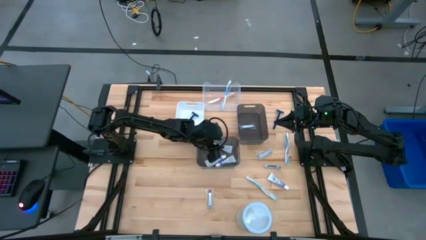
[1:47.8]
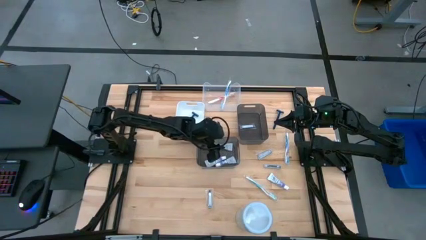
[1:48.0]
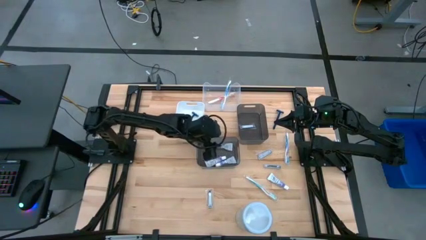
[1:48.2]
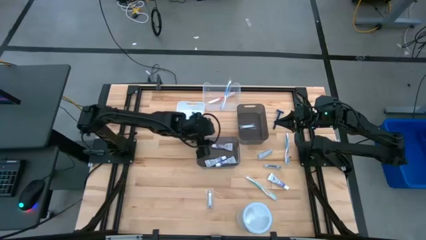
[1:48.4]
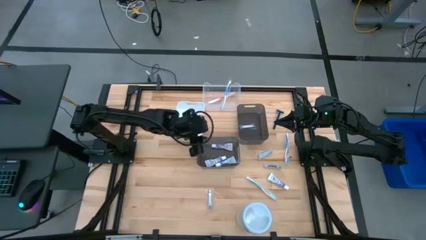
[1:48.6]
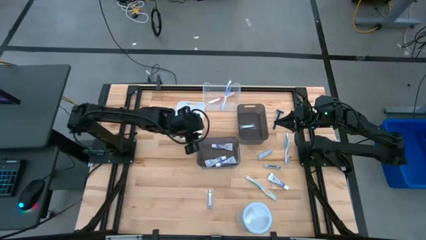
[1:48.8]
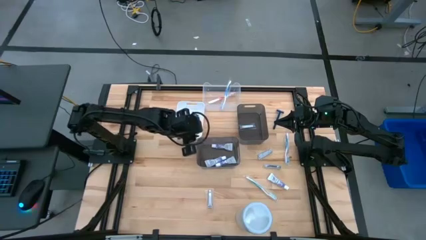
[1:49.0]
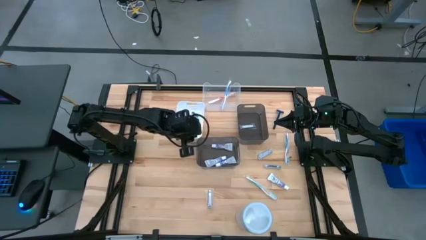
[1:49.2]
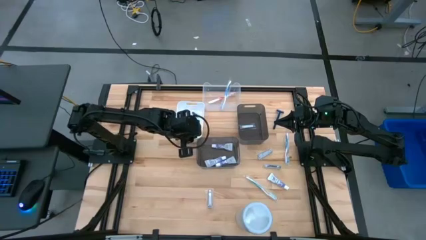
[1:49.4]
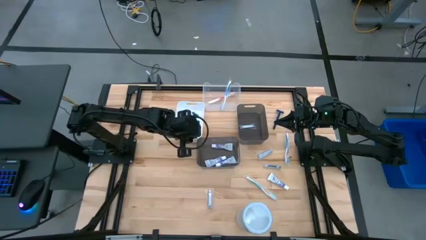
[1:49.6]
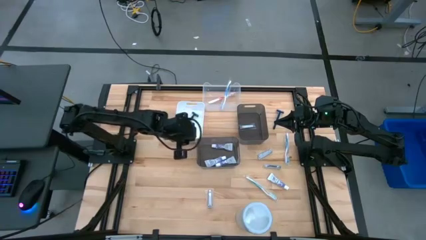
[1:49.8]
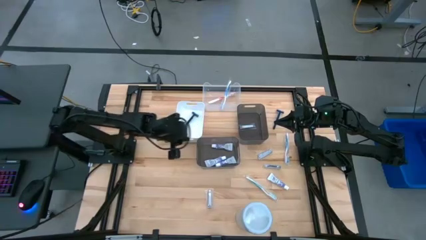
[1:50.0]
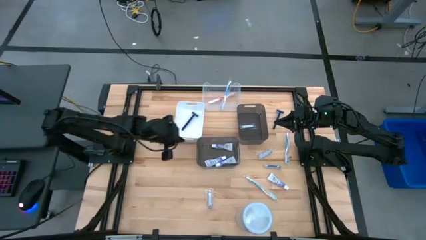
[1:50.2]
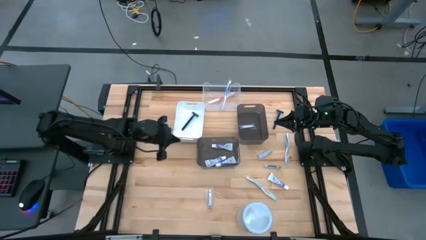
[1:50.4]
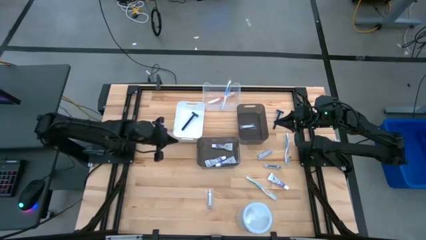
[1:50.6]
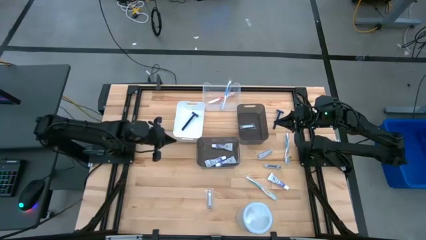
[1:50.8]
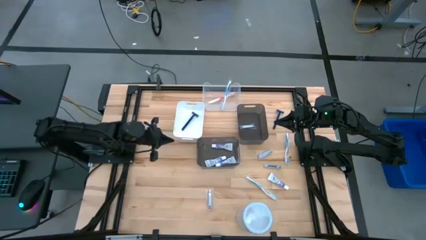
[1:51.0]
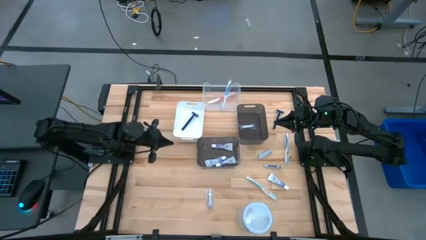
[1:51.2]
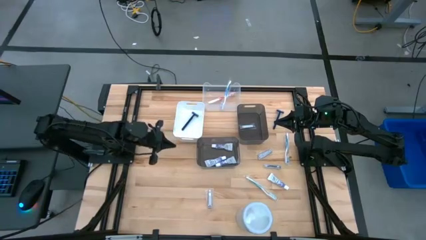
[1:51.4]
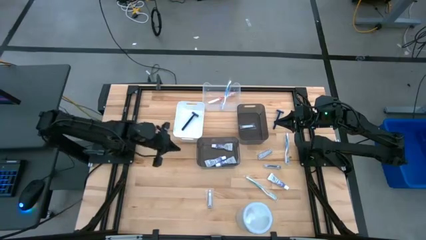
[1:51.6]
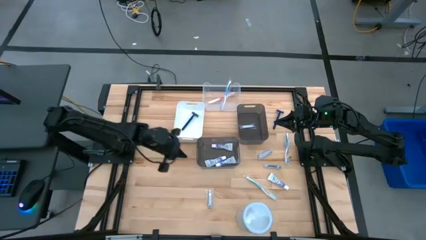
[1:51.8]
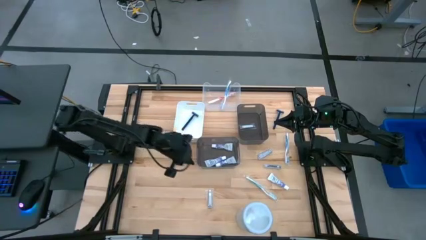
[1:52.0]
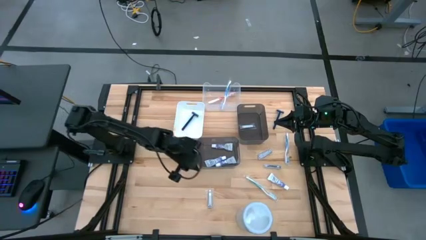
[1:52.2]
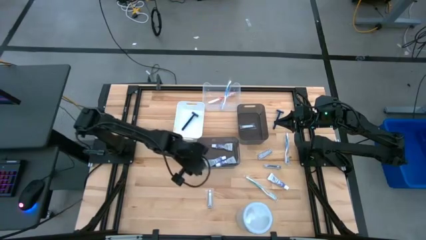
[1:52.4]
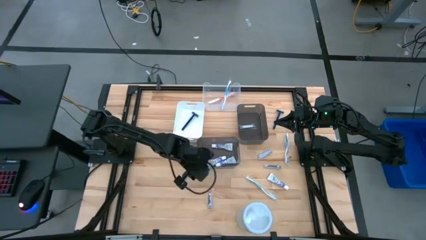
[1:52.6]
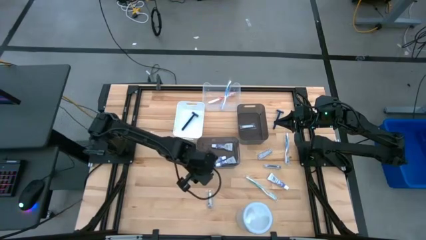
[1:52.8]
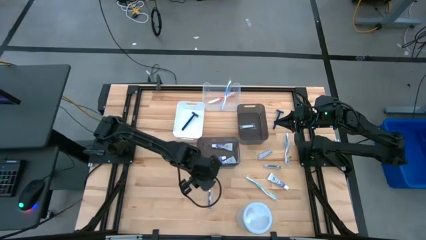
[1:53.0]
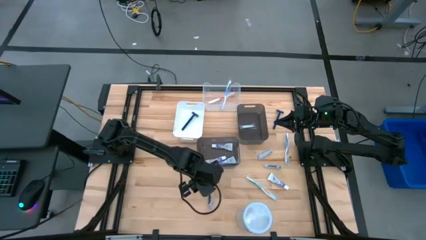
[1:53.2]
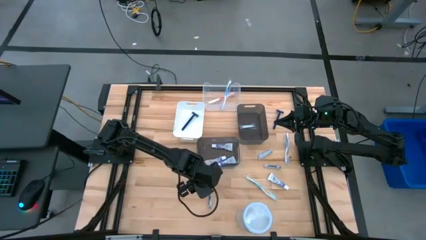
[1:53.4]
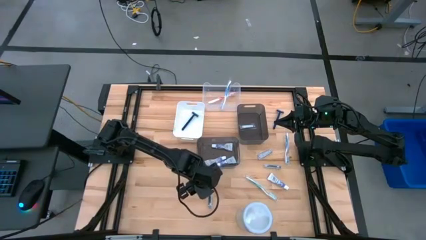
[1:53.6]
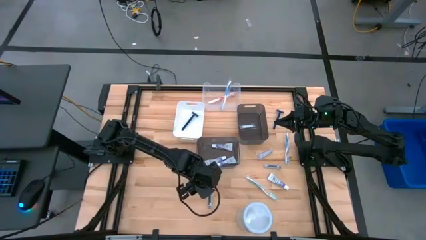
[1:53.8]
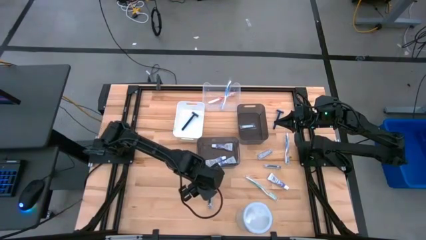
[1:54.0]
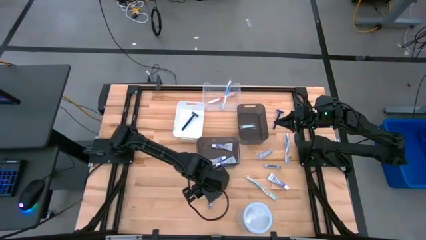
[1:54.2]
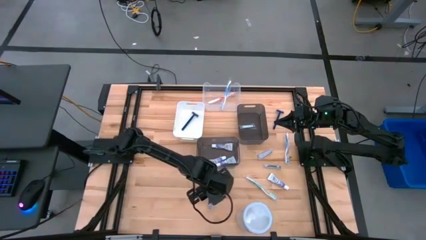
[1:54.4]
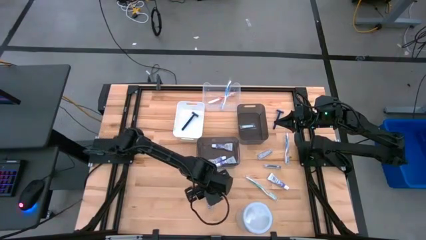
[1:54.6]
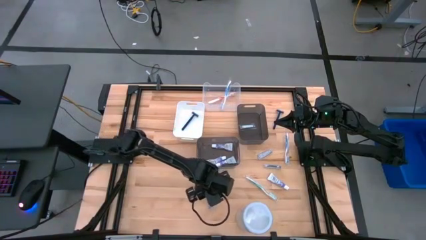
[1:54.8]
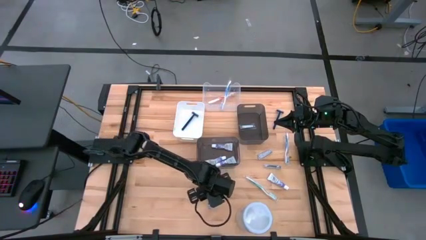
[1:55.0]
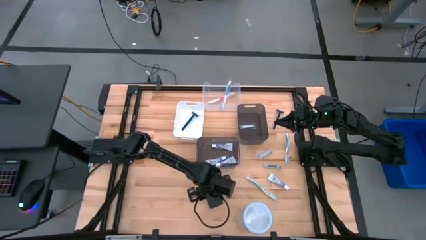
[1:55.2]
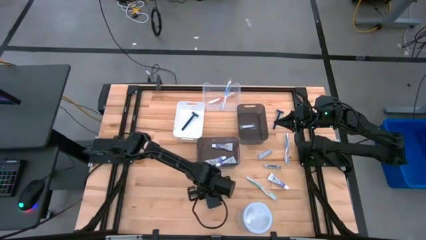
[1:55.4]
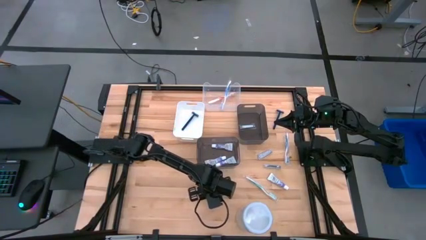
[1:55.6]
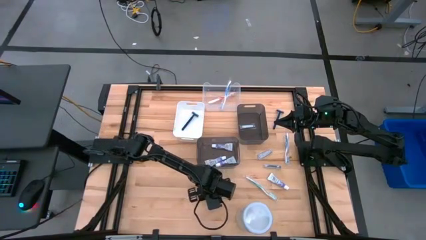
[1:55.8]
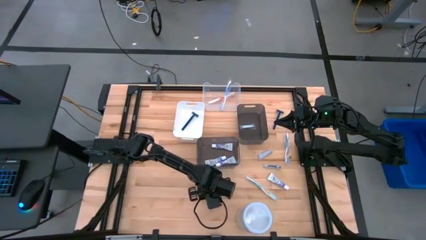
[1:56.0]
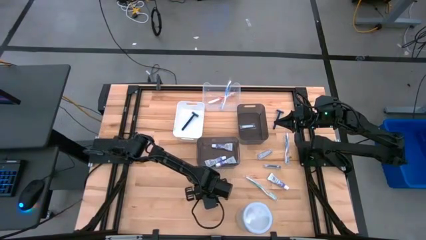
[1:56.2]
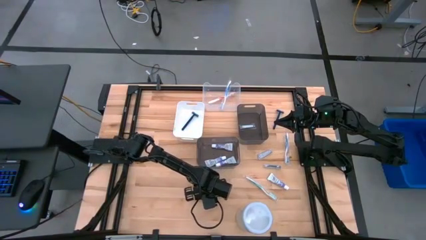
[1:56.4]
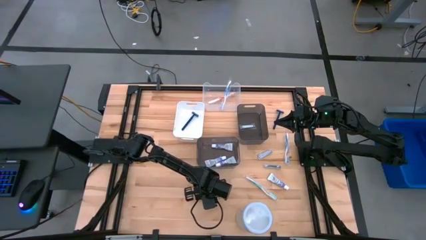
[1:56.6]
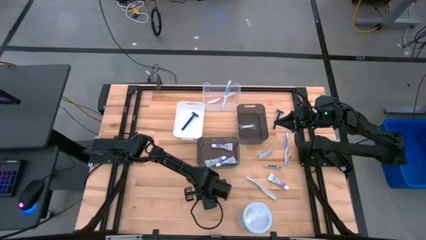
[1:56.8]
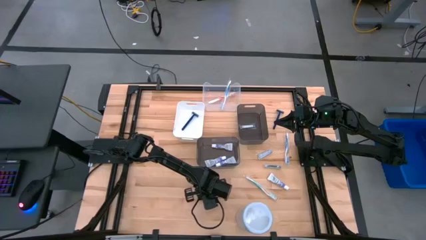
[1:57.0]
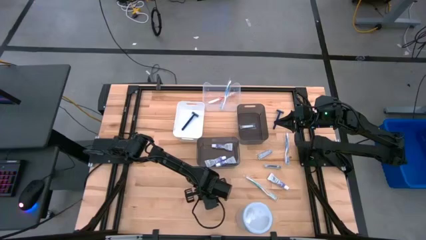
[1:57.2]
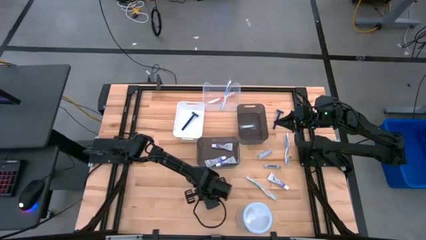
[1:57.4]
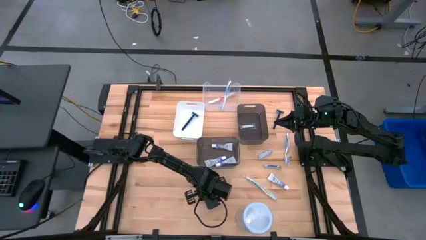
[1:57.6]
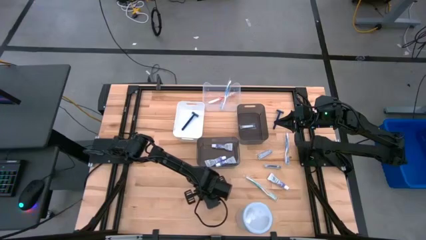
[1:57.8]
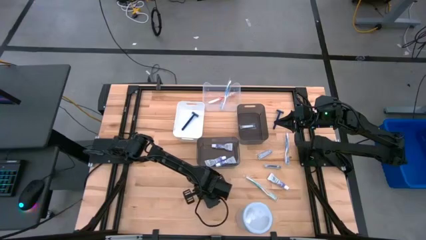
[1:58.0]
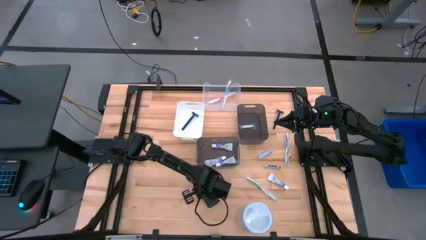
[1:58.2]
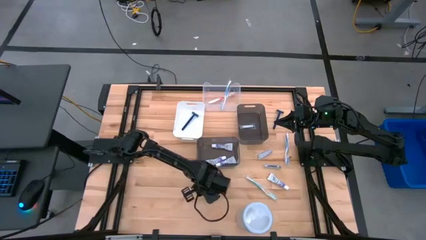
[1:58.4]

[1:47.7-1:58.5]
Task: Pick & Place Travel size toiletries
Put the silver nail cutter into the top black bin
